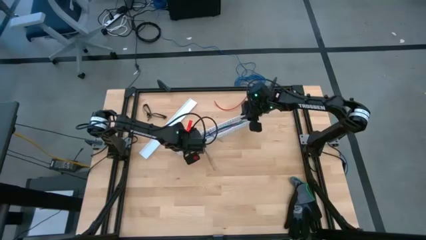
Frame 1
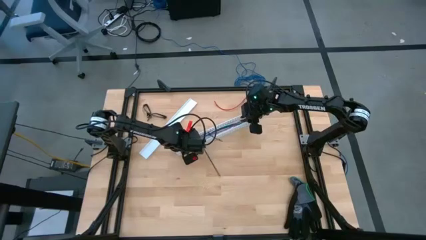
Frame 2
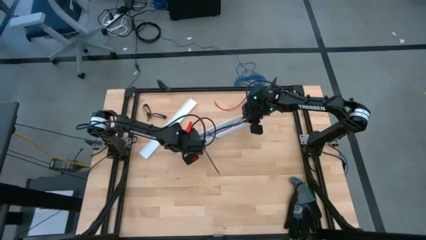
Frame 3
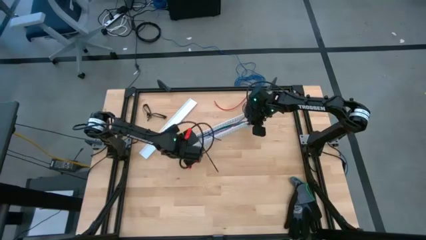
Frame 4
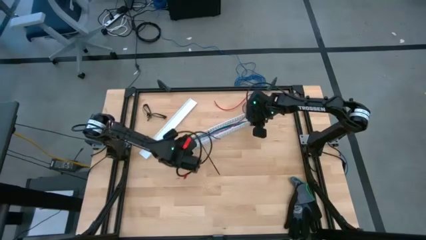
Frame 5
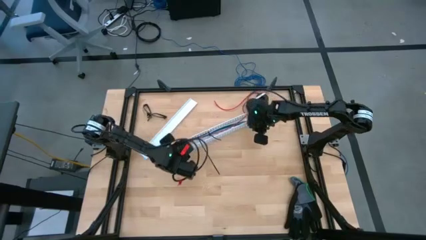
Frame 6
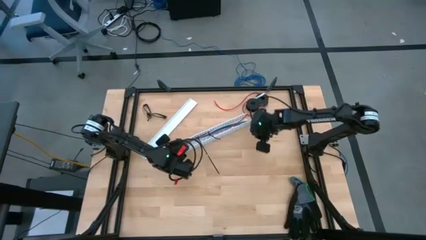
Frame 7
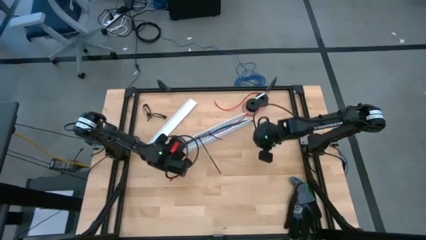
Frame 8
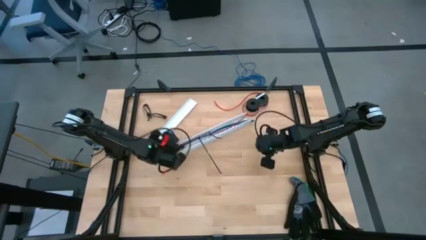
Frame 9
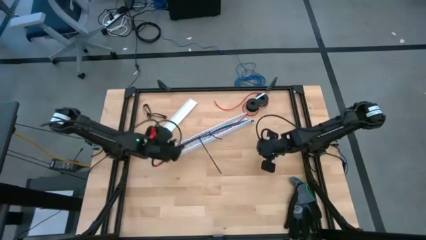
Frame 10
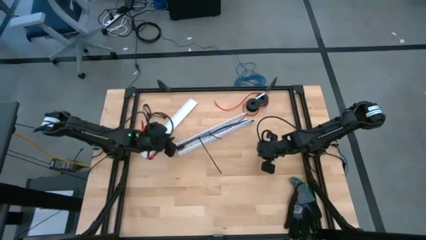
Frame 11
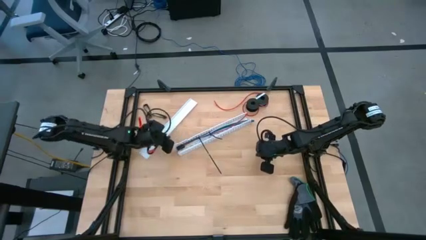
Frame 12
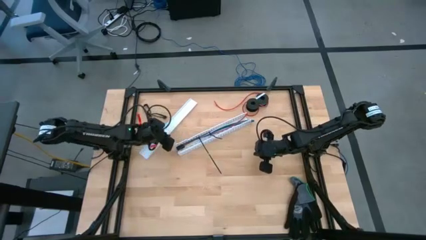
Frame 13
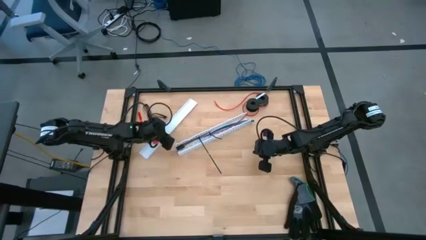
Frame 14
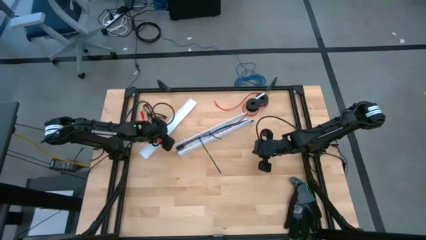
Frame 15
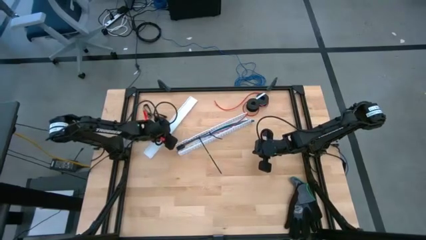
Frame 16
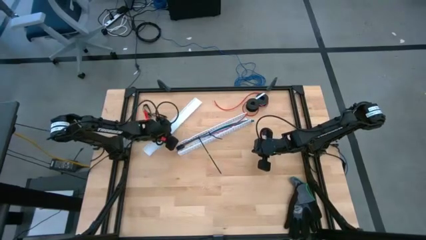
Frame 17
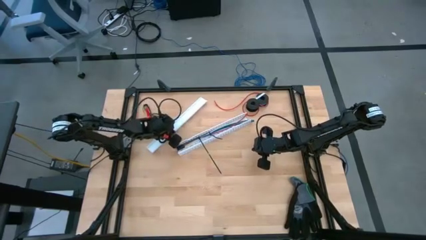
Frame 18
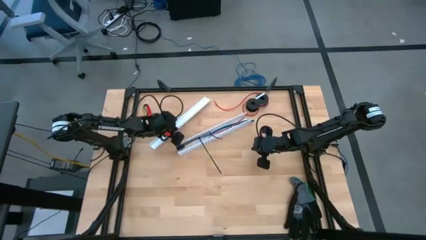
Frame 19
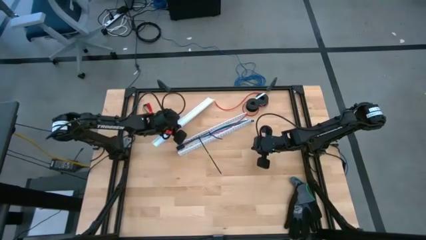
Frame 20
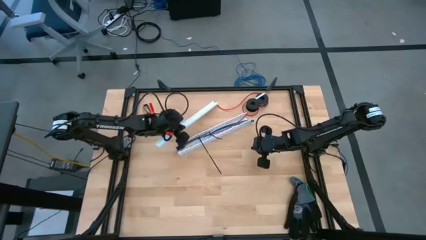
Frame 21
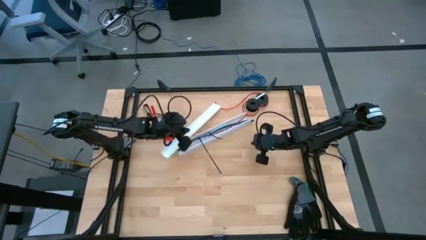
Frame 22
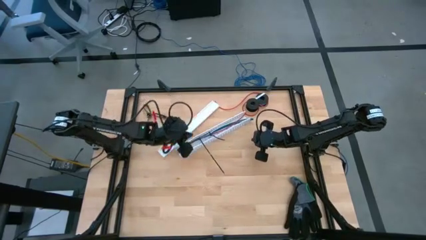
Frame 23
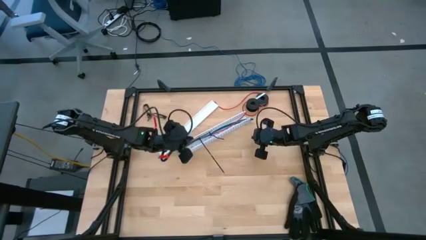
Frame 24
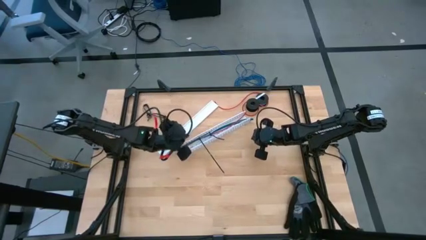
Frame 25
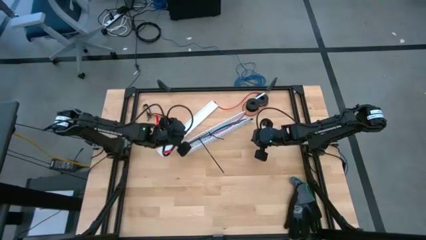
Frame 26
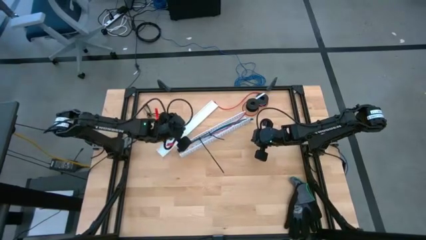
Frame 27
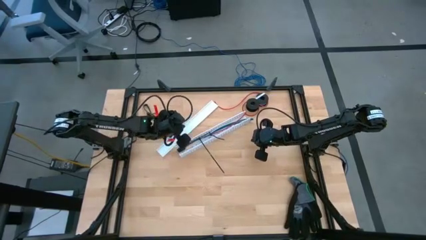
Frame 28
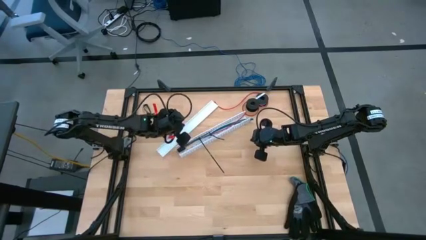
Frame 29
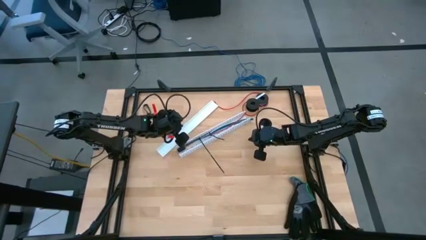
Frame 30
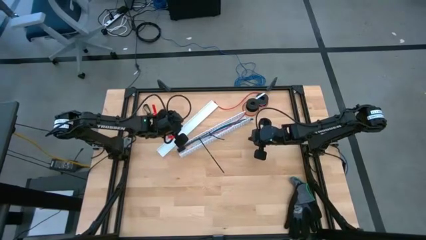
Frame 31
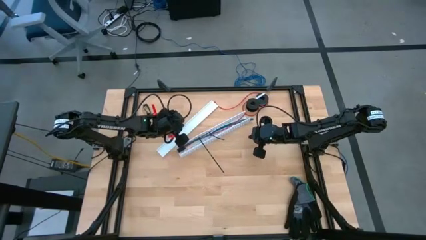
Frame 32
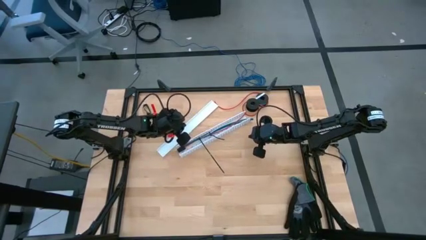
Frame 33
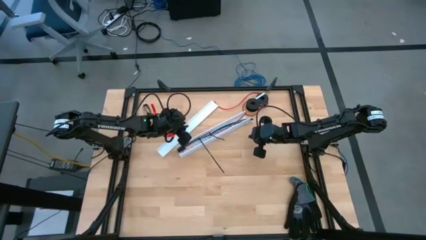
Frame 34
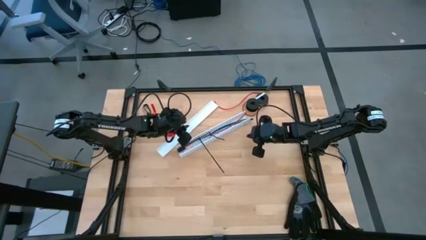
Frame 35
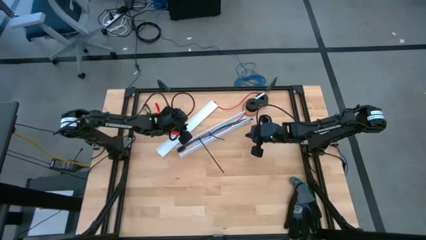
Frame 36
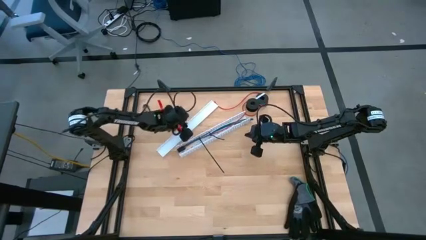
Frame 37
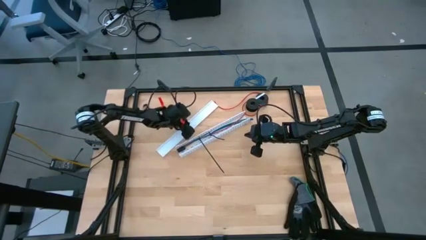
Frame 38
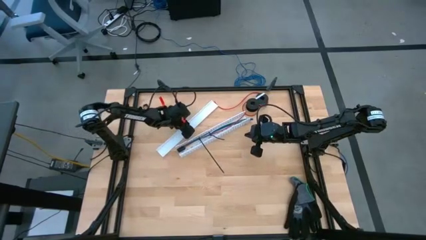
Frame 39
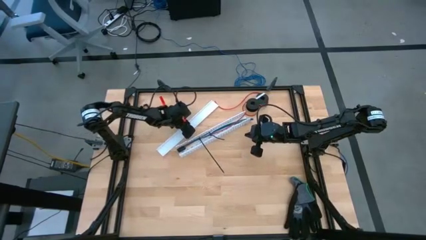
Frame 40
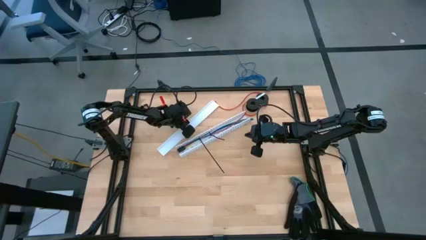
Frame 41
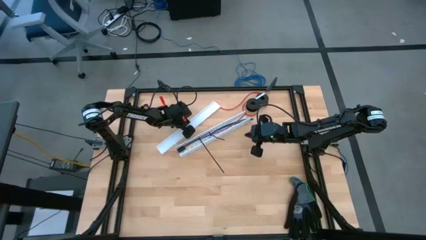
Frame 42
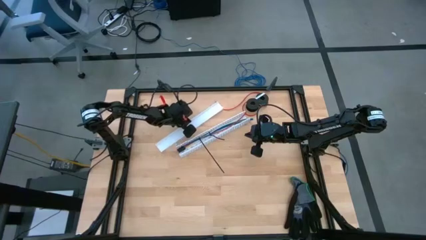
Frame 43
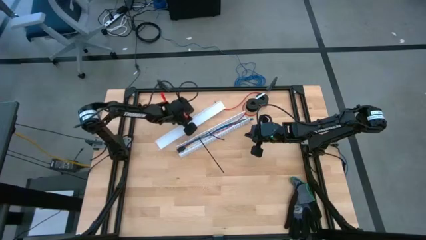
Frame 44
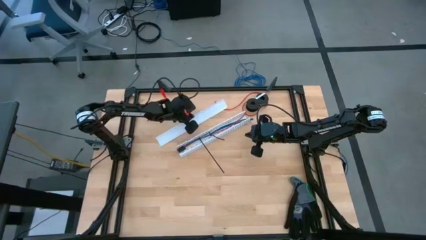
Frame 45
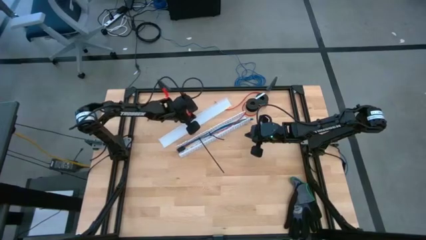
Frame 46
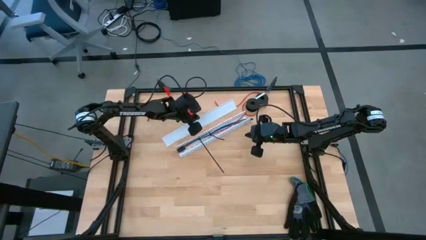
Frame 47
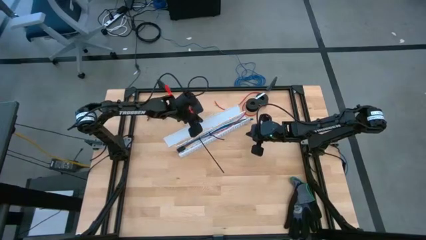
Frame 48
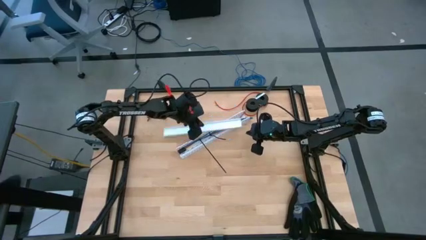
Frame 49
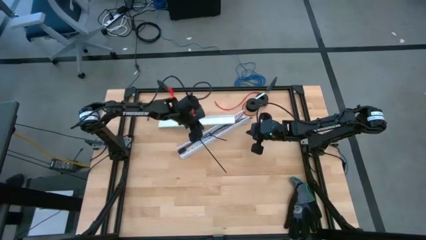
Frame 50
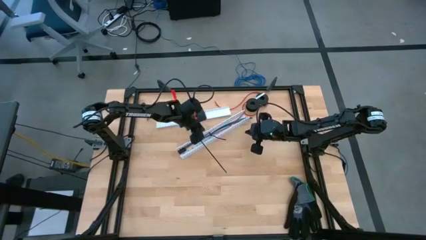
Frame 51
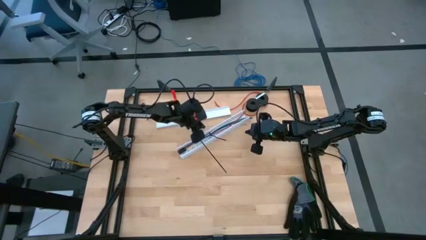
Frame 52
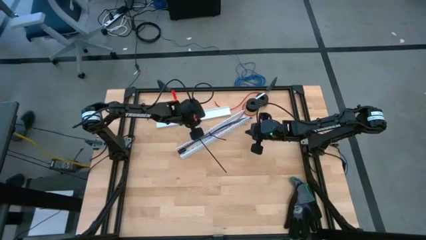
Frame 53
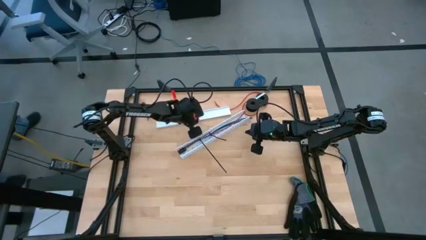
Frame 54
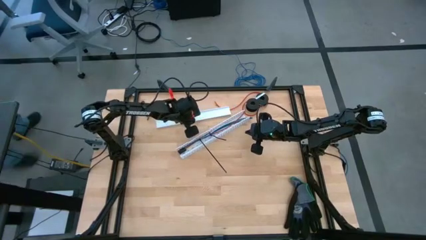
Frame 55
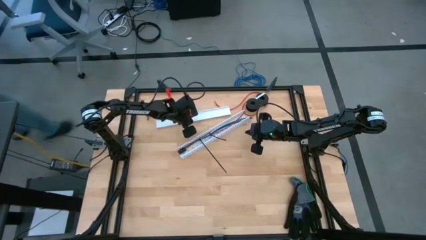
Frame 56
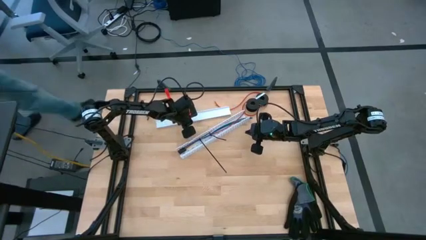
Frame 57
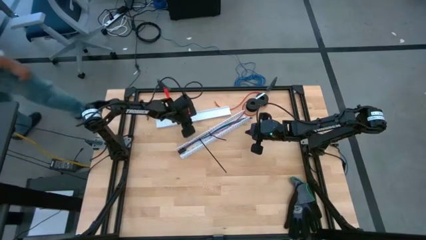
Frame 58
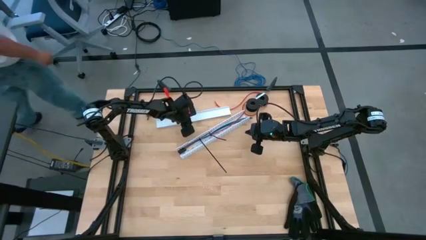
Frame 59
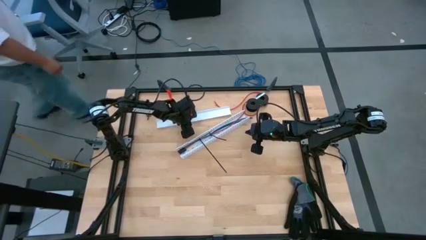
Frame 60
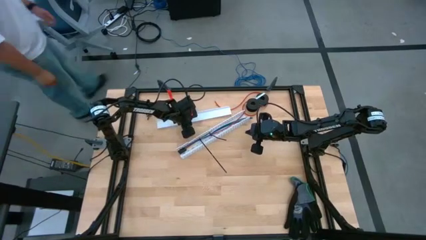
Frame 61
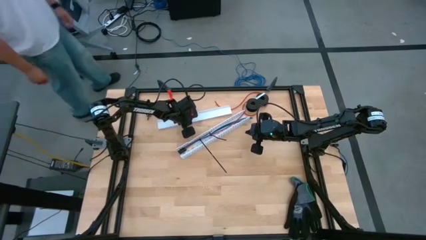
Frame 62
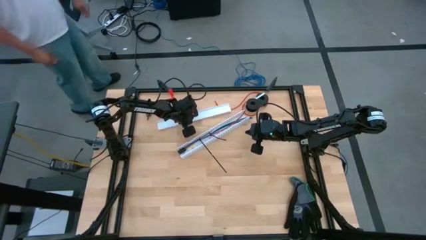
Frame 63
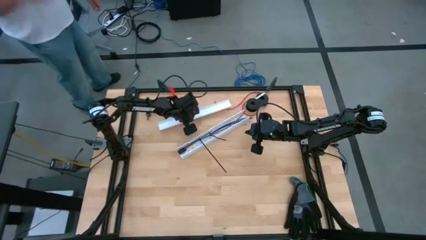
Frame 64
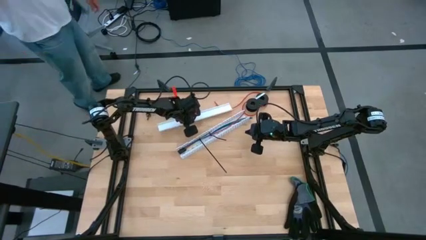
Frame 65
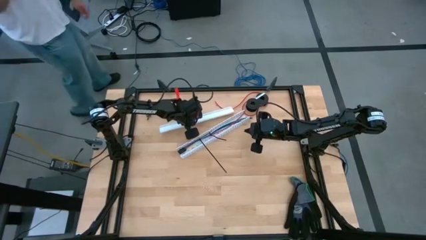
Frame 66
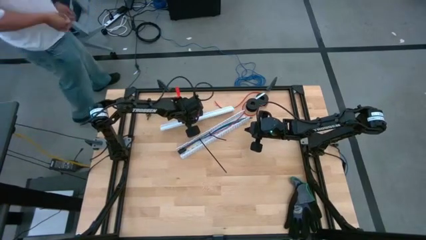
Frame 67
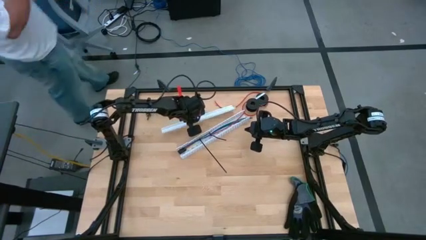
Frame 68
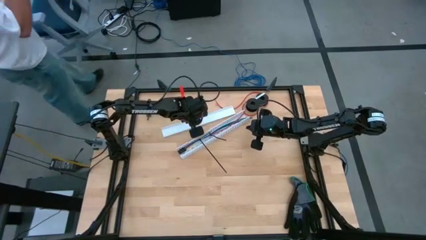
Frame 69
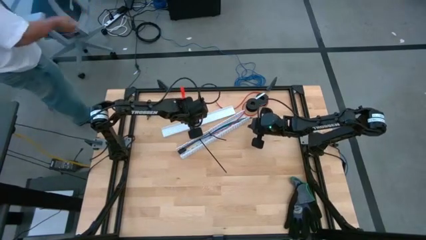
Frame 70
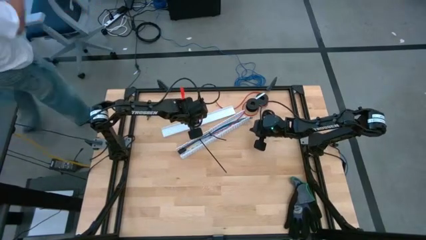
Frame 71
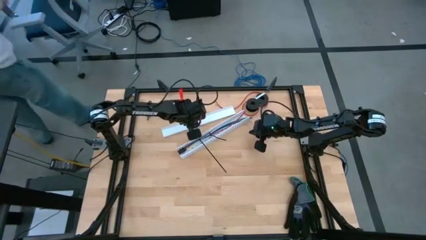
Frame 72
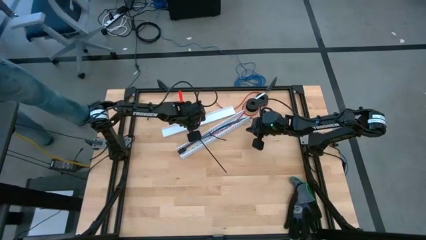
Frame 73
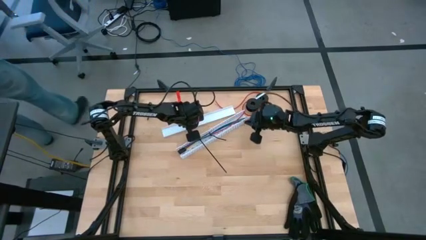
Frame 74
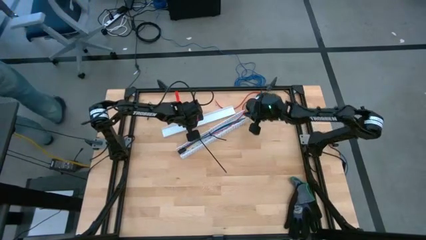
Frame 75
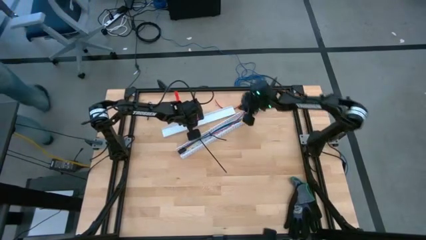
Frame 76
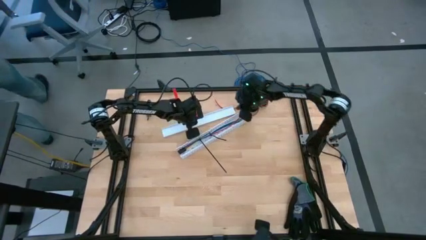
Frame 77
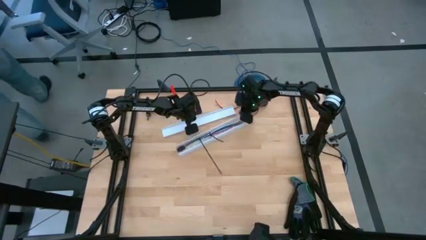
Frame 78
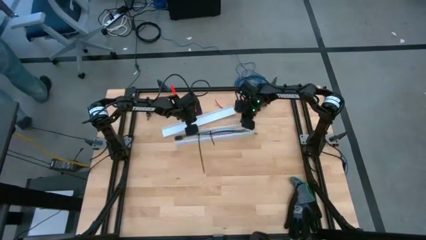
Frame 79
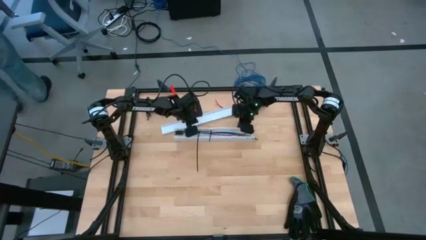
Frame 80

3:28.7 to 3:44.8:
Task: Ziptie cables
Close the white cable duct
